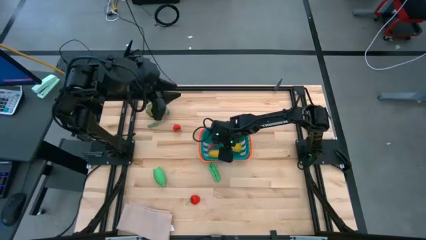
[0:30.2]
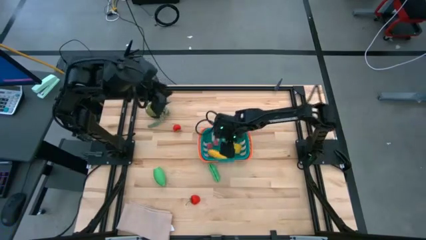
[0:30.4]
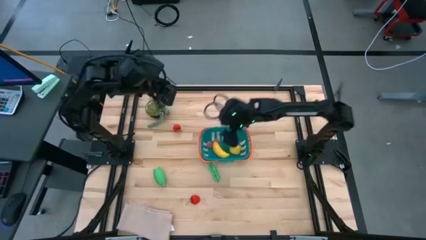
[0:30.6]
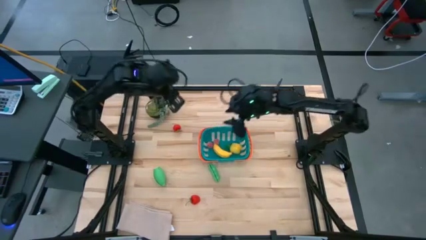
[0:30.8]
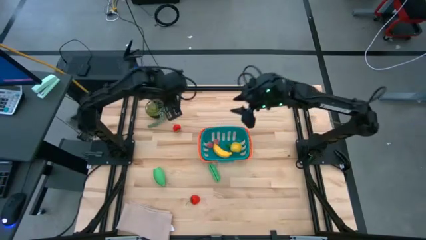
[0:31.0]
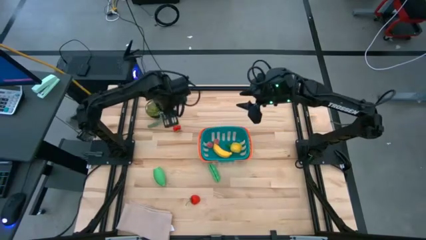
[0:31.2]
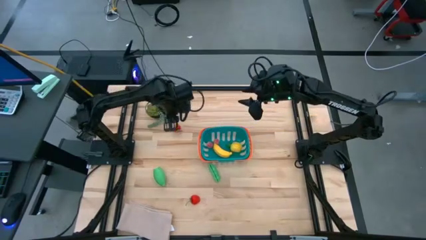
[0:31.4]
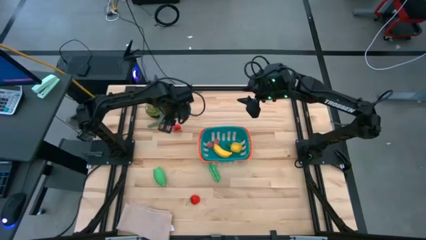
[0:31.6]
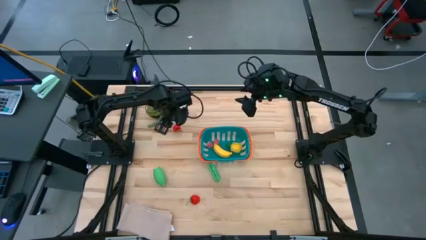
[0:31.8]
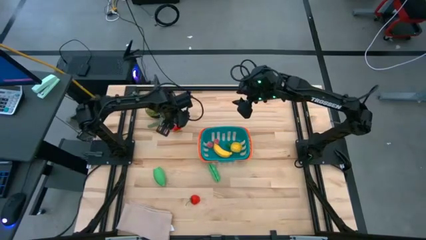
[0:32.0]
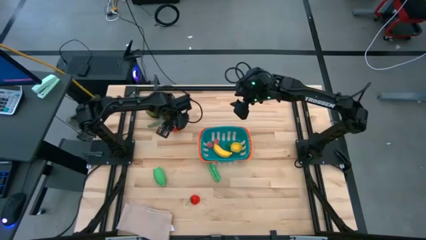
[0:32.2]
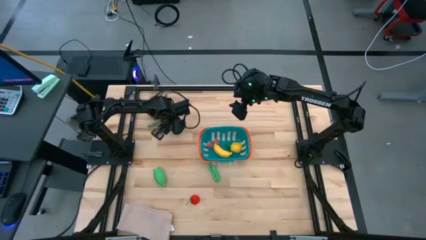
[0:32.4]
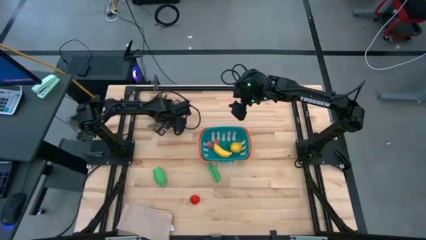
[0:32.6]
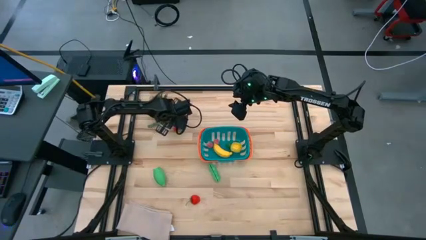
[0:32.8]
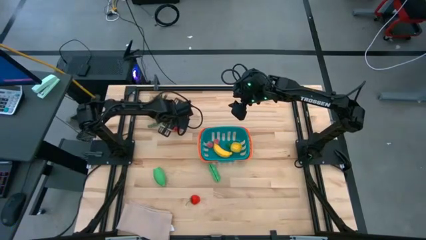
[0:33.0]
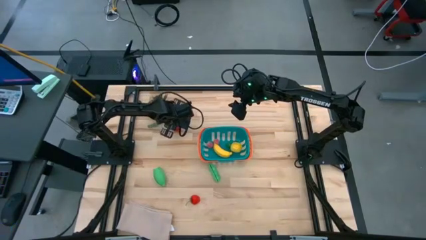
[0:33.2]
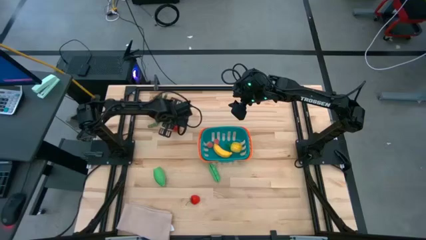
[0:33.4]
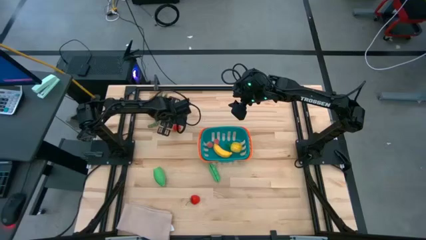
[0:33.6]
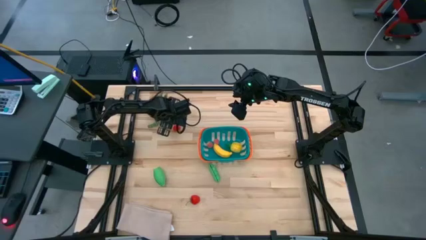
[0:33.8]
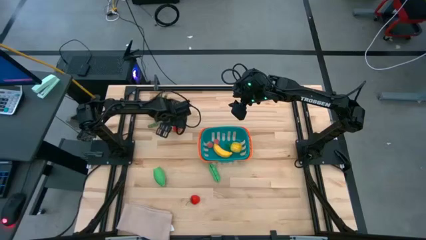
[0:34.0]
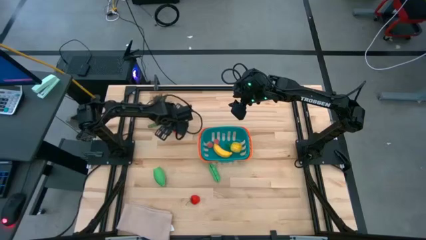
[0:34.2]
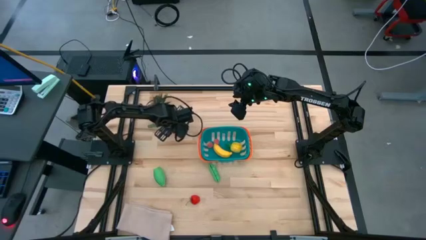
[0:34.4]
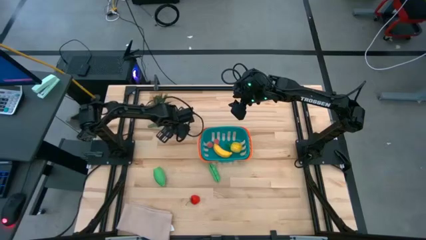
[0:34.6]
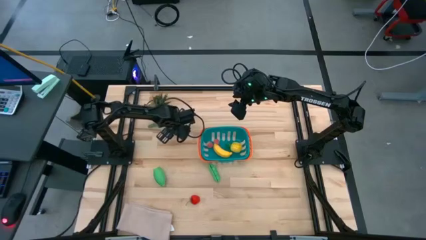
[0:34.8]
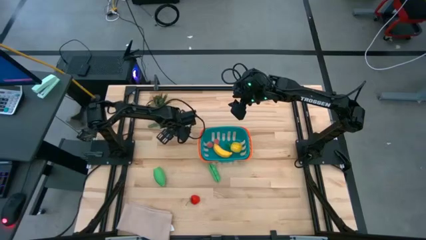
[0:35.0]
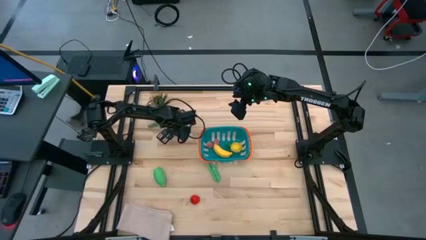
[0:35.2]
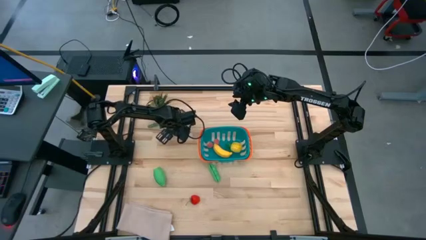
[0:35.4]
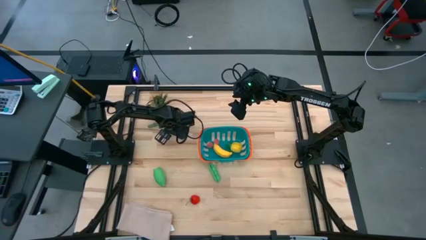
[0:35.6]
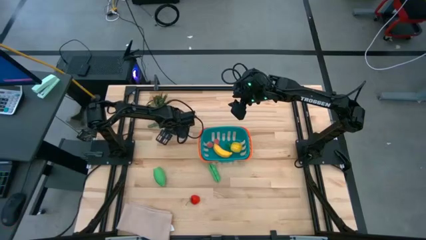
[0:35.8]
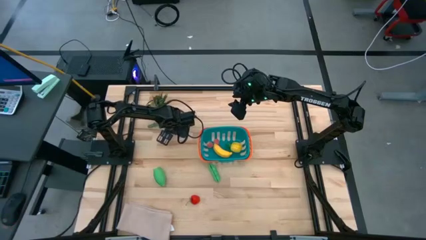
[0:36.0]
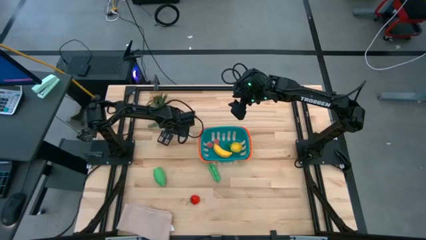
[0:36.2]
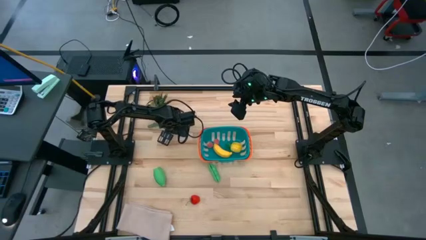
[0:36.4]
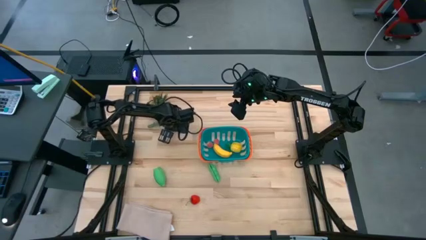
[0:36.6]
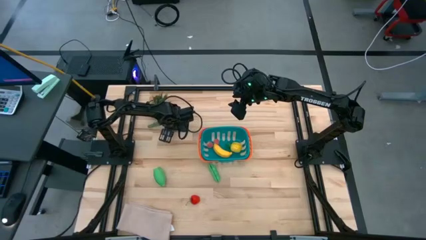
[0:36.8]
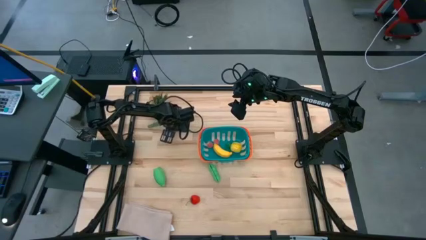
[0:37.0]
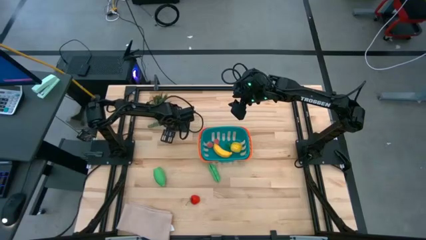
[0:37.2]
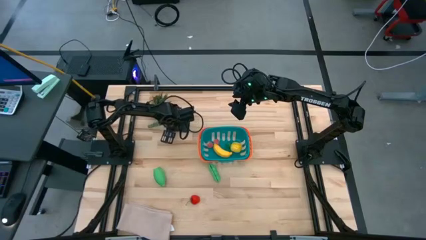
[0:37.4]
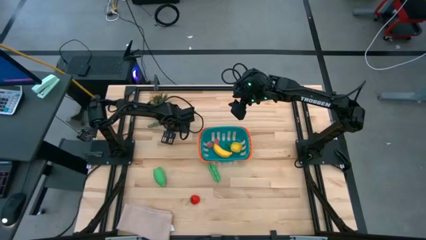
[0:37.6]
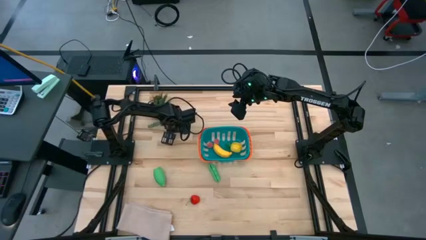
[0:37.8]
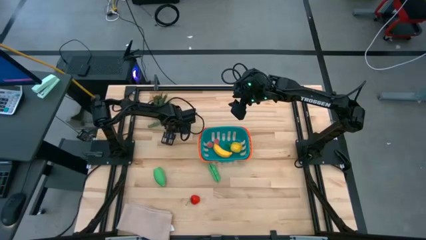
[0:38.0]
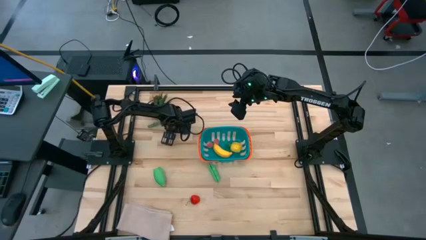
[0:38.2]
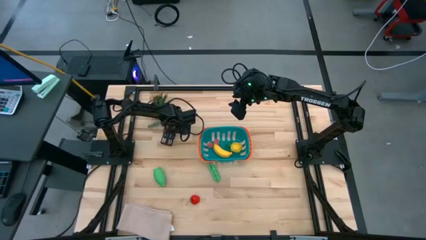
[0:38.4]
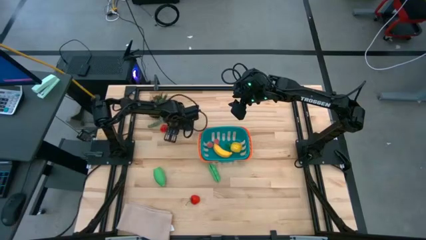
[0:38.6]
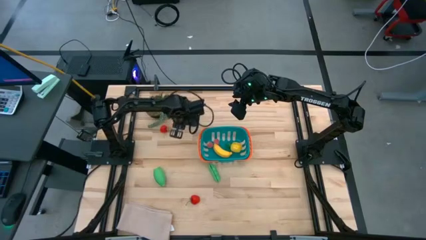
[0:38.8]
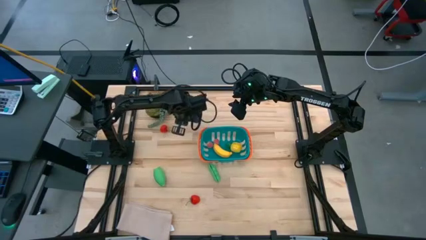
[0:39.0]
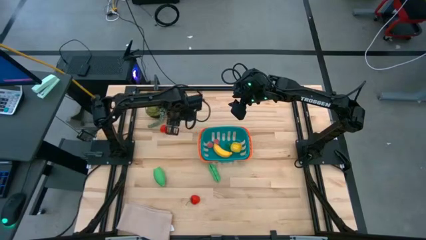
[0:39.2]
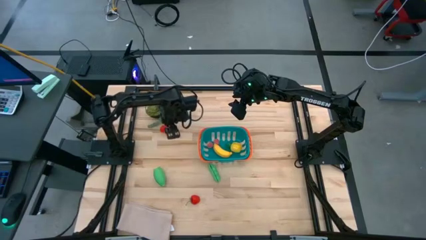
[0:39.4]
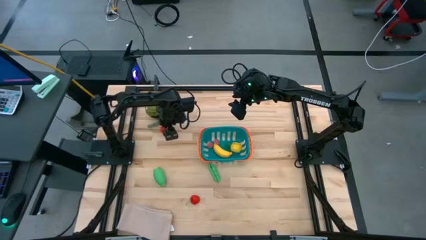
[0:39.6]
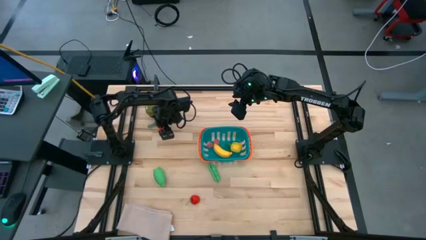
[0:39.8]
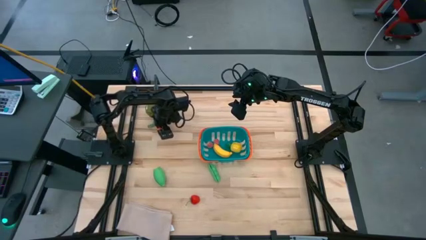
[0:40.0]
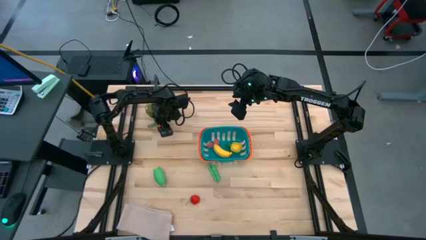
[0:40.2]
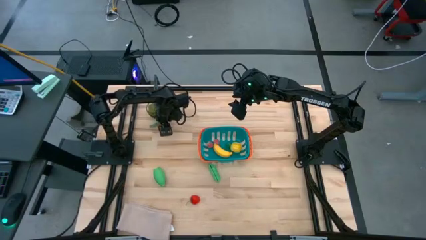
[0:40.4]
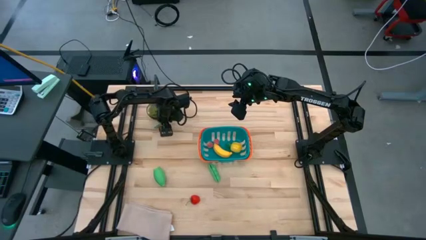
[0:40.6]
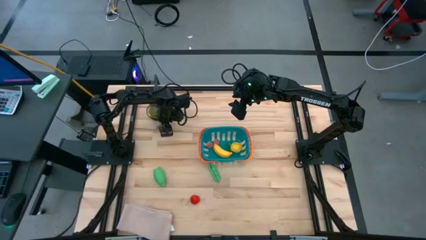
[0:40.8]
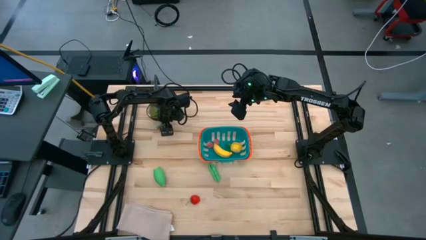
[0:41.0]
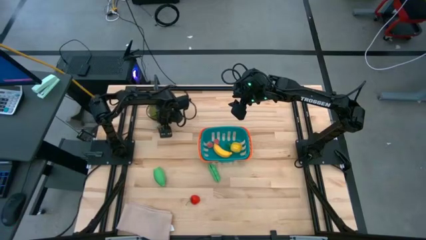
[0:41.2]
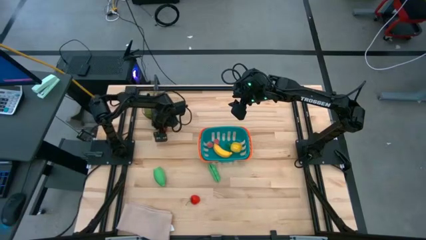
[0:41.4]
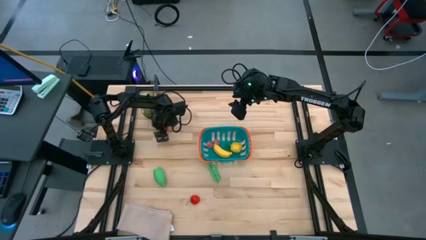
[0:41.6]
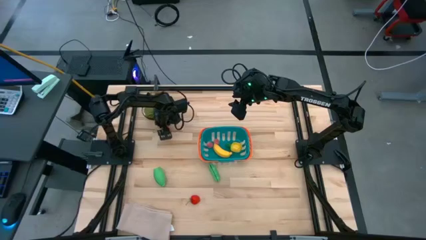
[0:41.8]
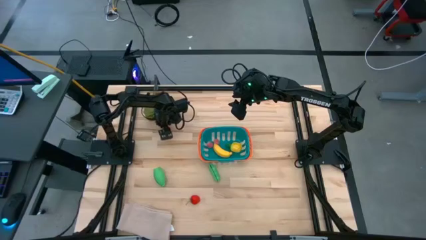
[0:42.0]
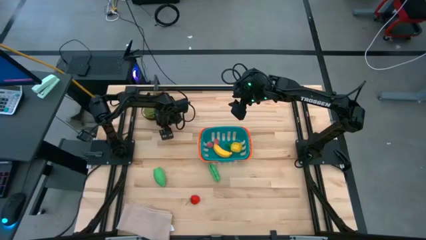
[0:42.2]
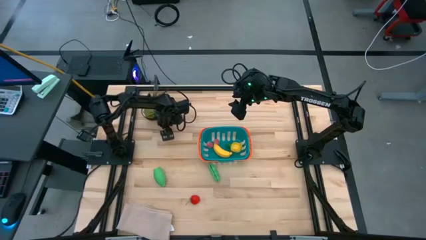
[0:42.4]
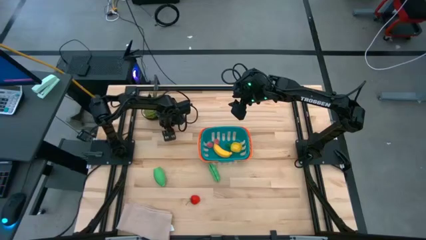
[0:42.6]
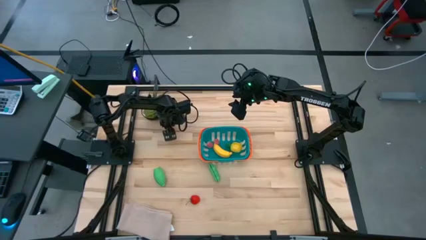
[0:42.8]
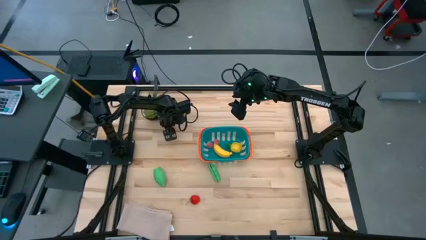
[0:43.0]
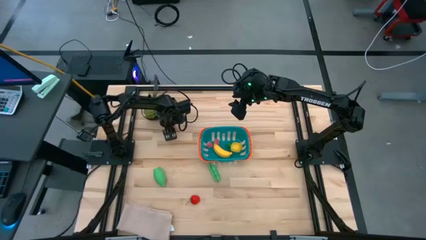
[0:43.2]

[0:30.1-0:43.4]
Task: Pick and placing Produce into tupperware
Put the top red strawberry into the blue bin

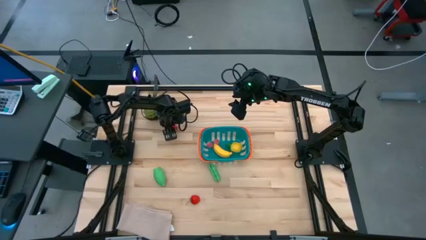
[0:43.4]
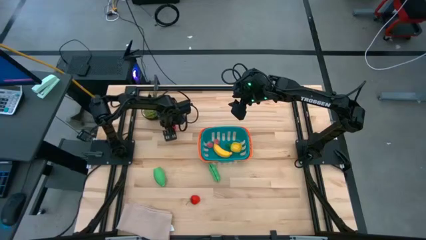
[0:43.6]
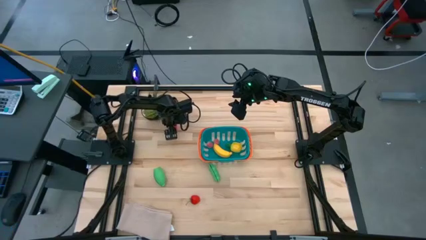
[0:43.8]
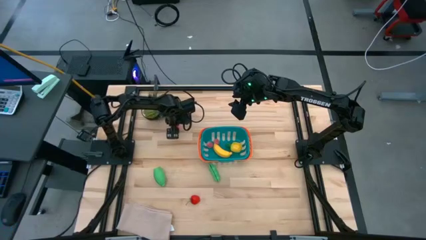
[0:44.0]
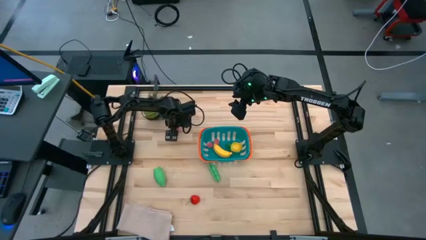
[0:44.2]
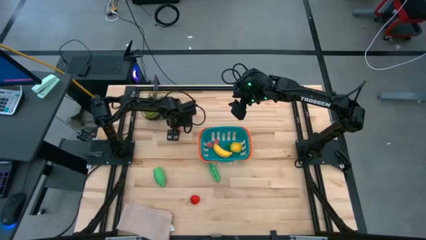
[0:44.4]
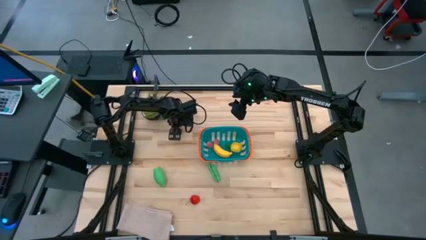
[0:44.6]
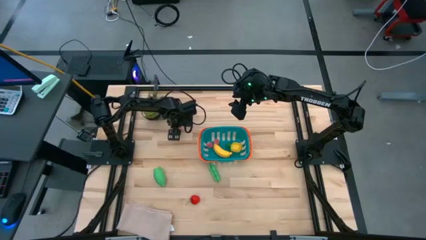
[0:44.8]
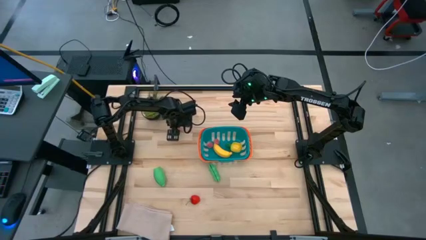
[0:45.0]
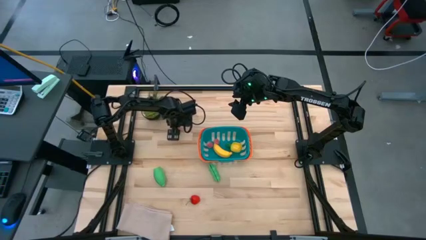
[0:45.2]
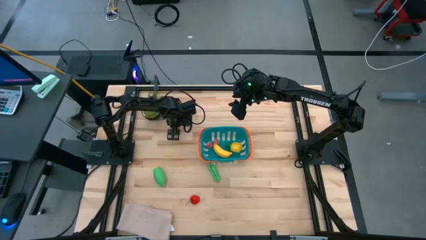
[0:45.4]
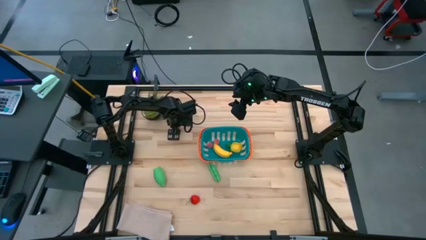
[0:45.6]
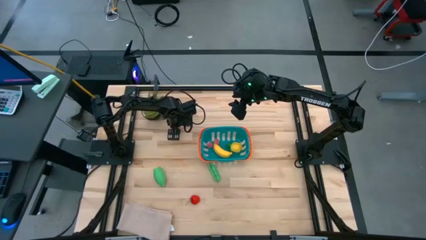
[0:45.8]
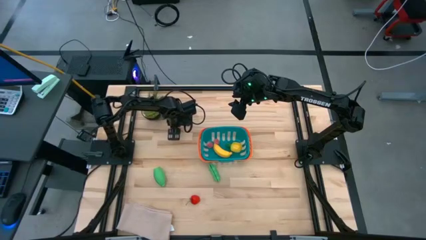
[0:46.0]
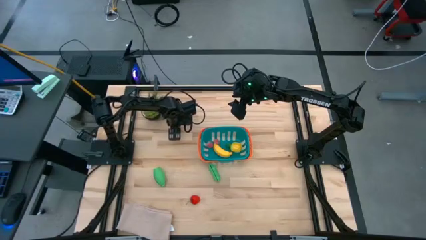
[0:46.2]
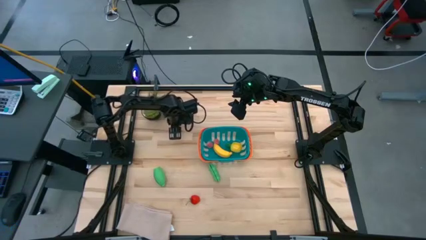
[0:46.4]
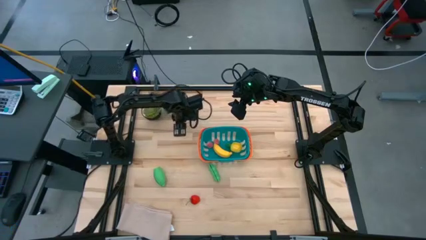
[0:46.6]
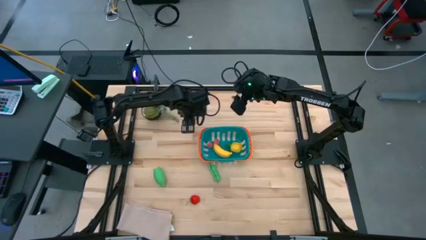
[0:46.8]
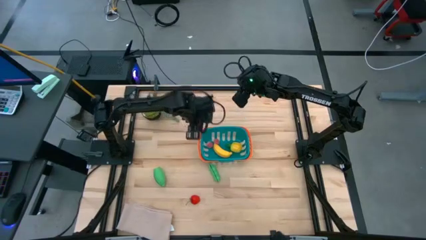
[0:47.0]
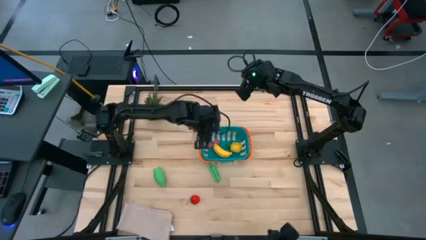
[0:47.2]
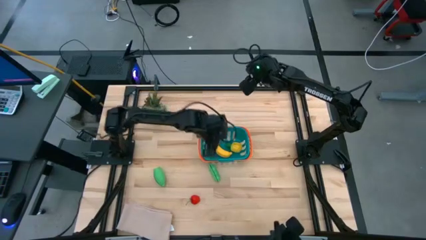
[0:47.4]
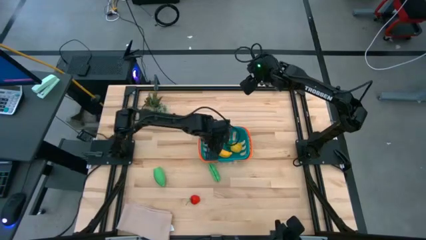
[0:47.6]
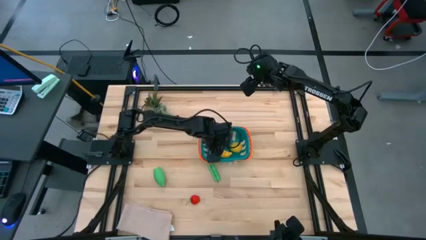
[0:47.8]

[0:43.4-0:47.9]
Put the top red strawberry into the blue bin
